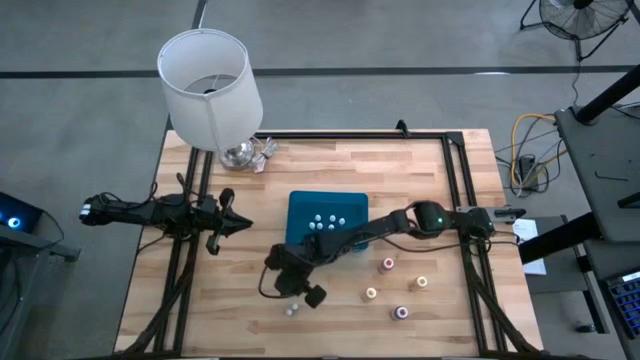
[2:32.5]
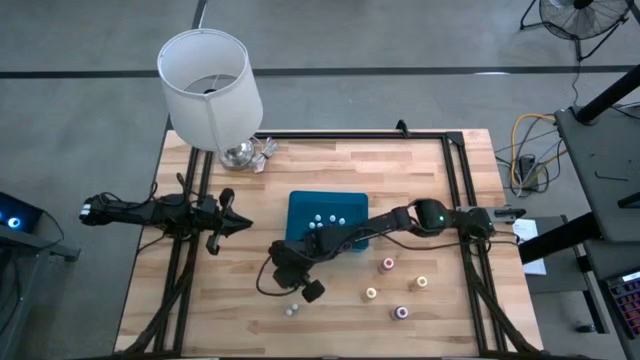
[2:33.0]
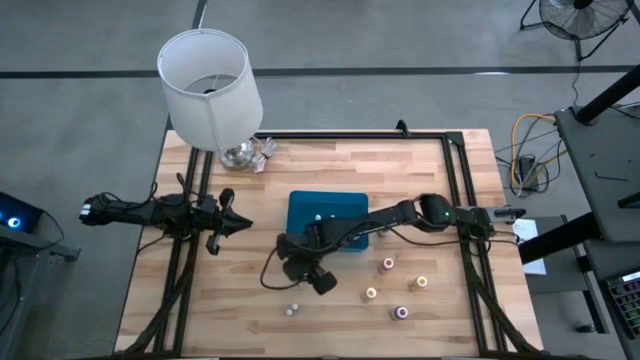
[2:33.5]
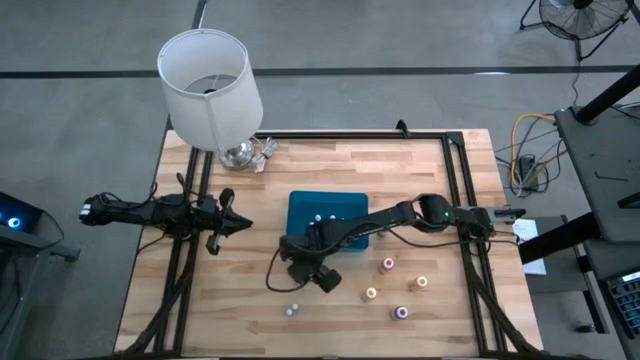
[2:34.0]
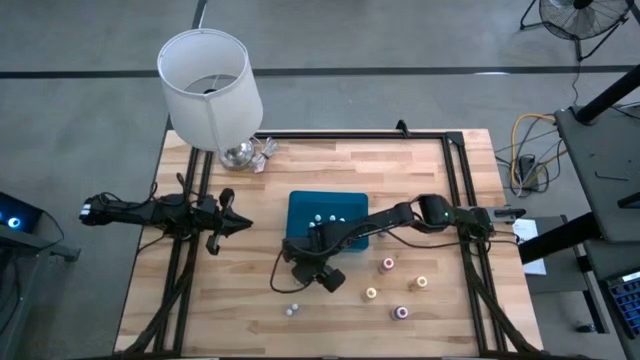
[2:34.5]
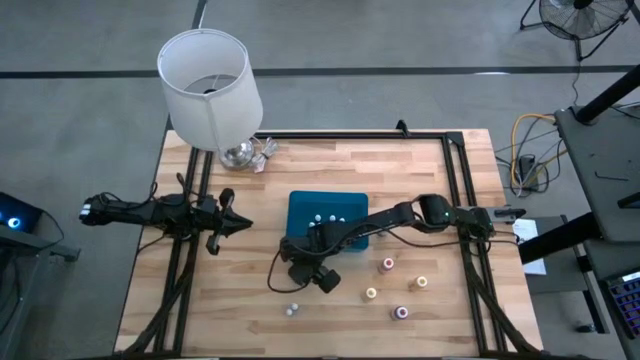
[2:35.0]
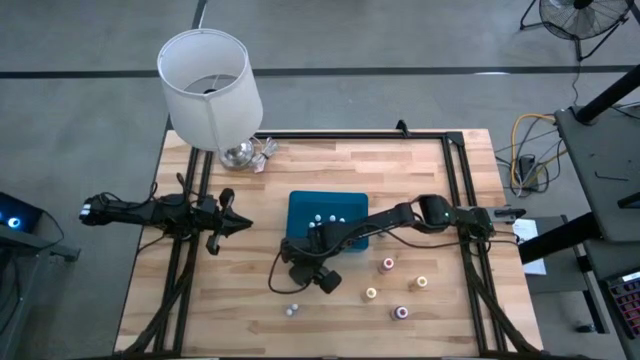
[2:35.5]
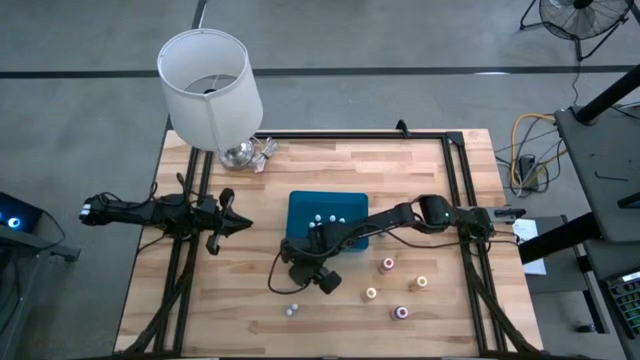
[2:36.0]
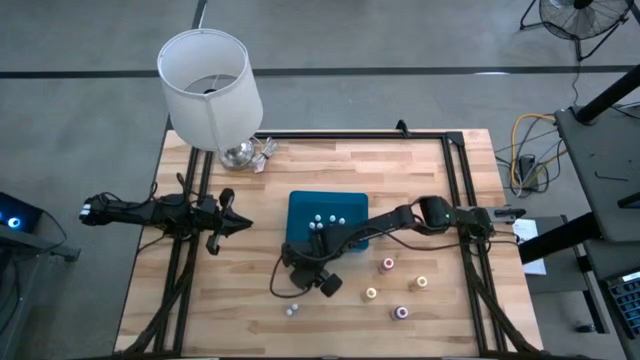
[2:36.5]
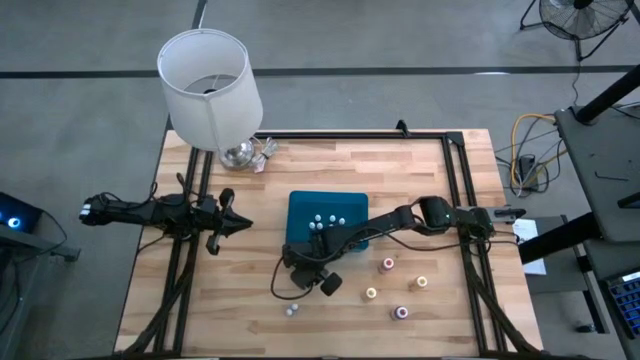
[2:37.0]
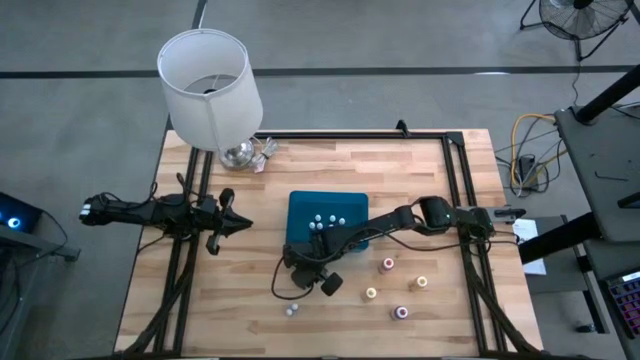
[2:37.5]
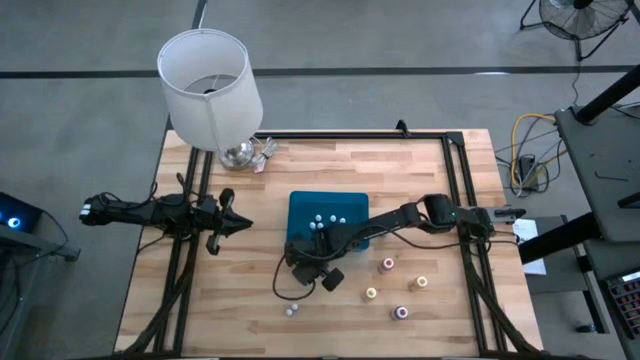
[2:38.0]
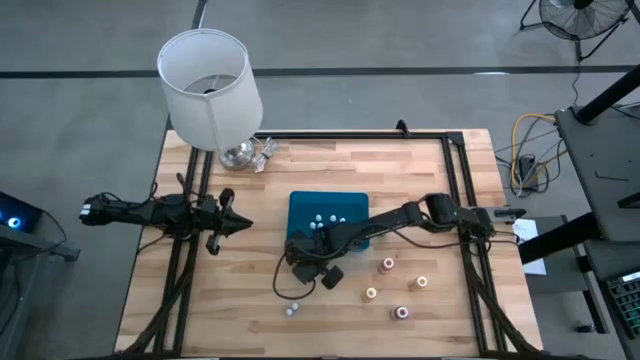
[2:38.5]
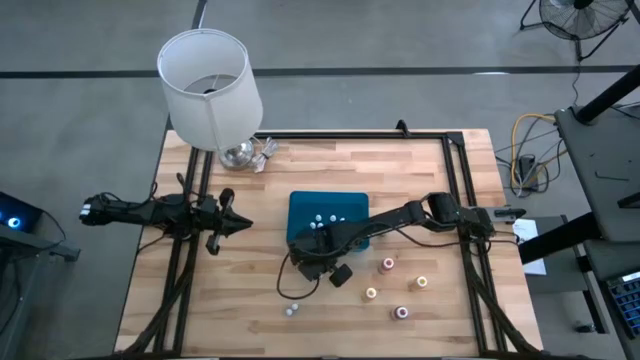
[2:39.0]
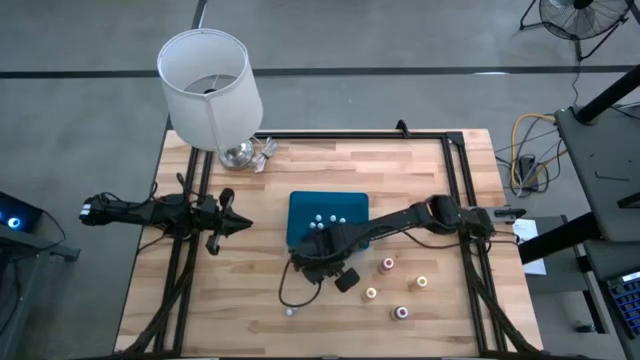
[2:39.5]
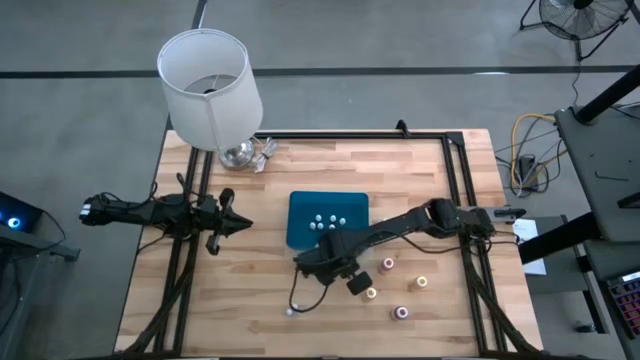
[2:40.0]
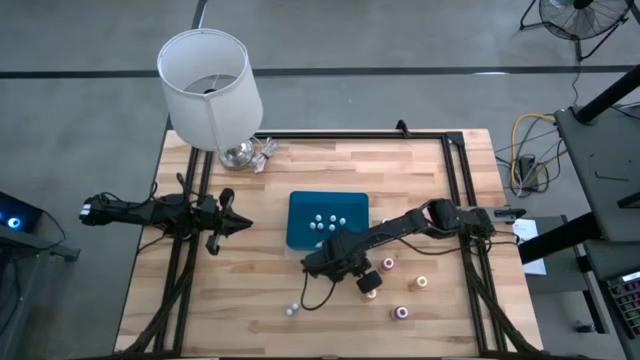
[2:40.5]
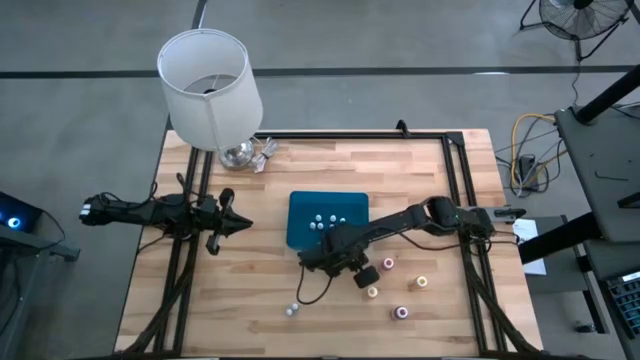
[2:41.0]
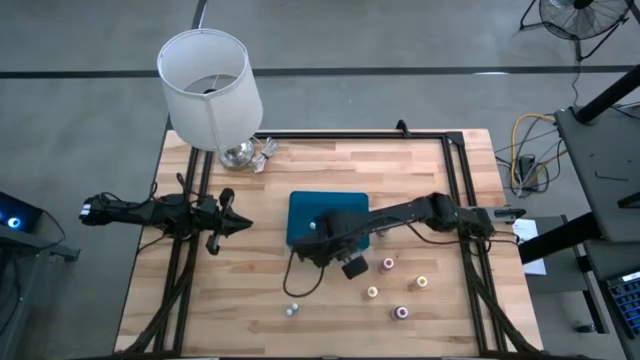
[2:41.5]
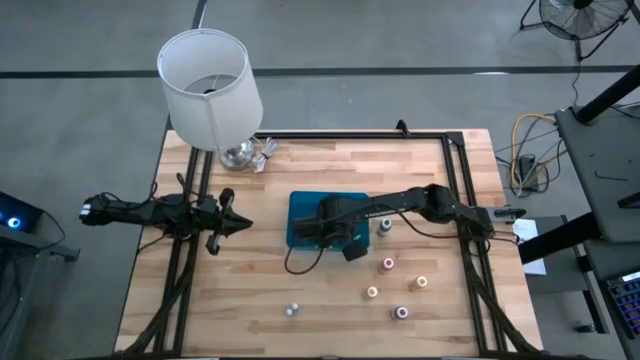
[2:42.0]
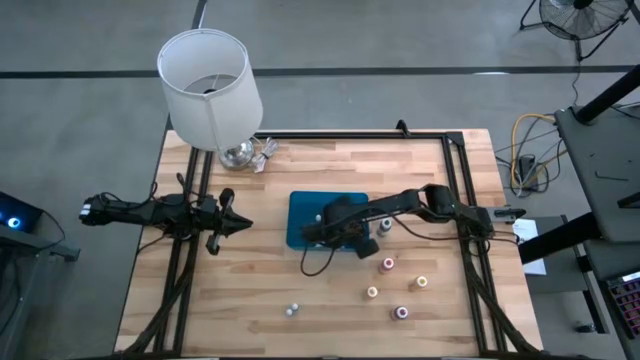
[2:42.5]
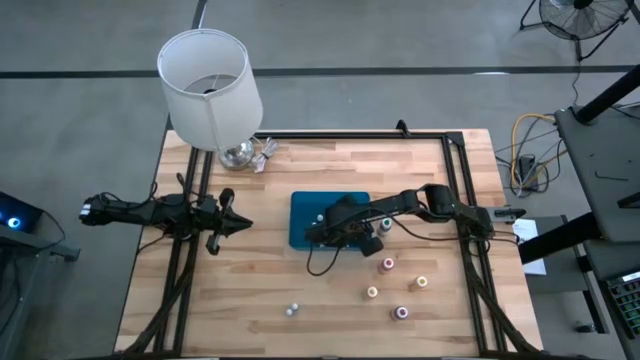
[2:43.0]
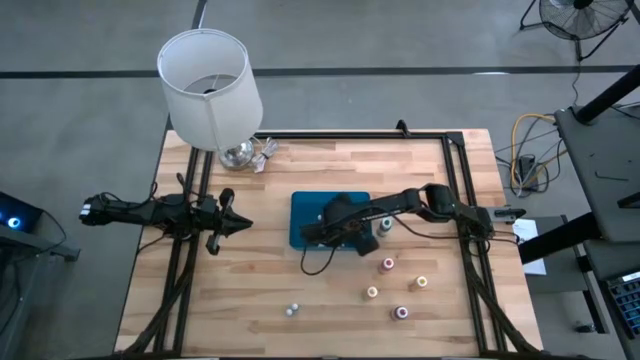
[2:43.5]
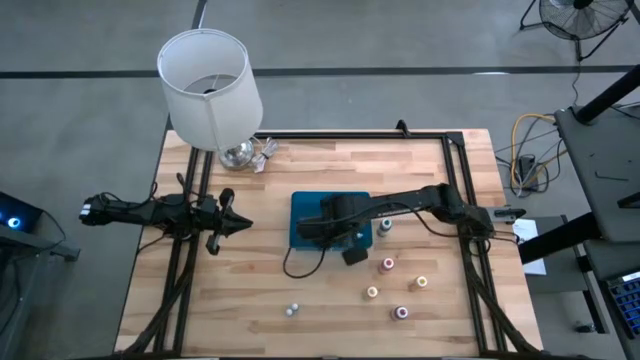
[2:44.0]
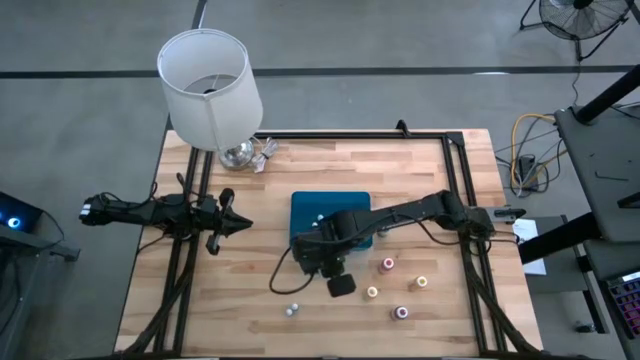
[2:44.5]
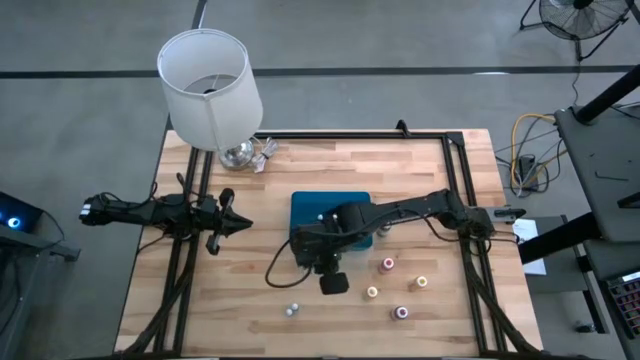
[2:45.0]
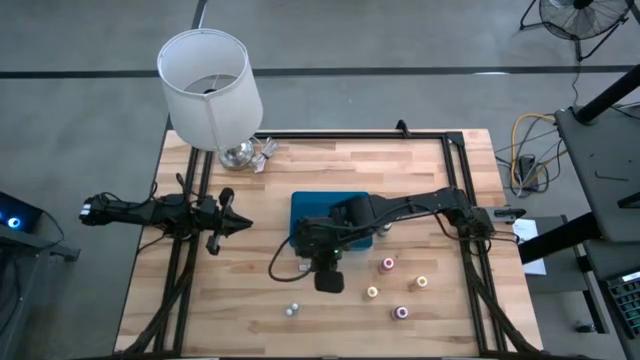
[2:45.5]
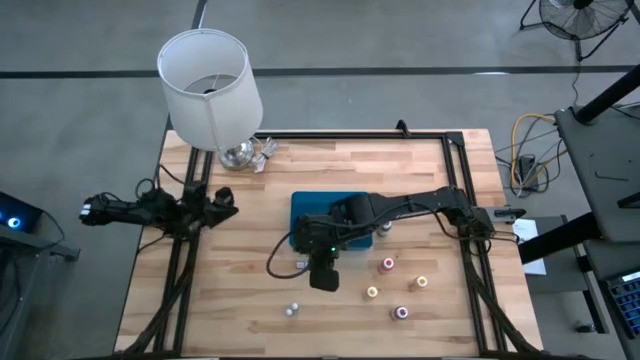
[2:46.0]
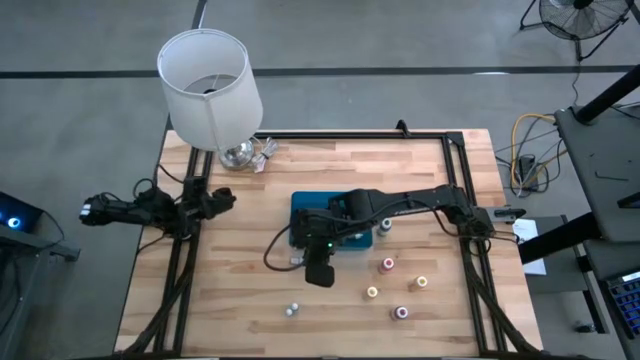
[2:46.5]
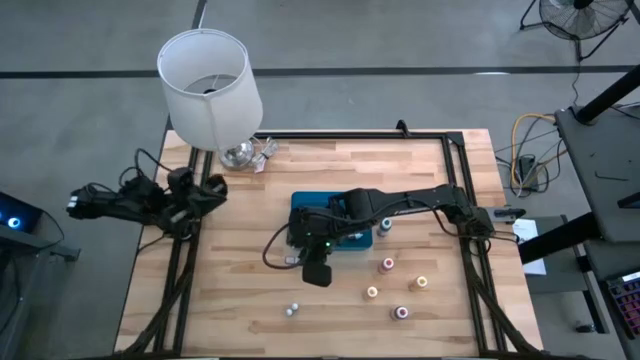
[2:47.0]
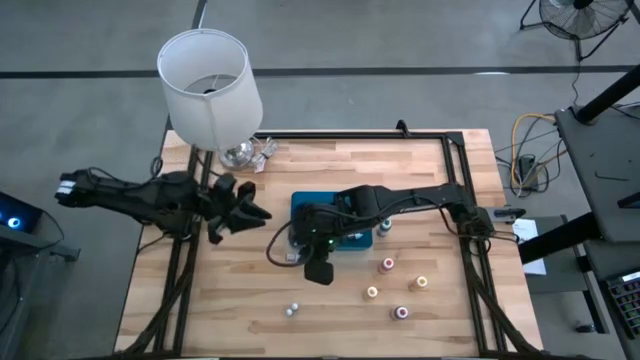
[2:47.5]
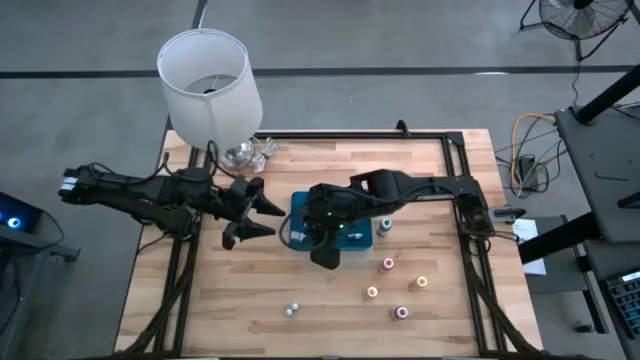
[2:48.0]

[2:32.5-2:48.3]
Task: Pick & Place food coloring
Put the small orange food coloring bottle into the blue bin

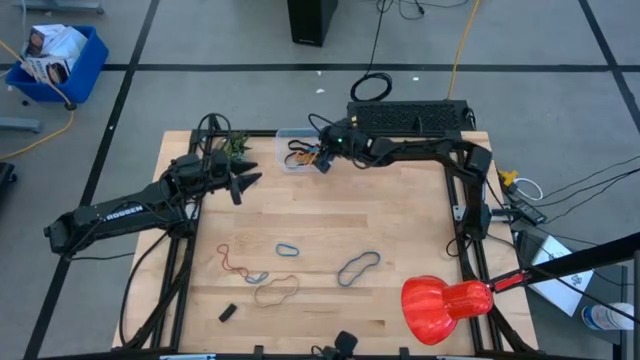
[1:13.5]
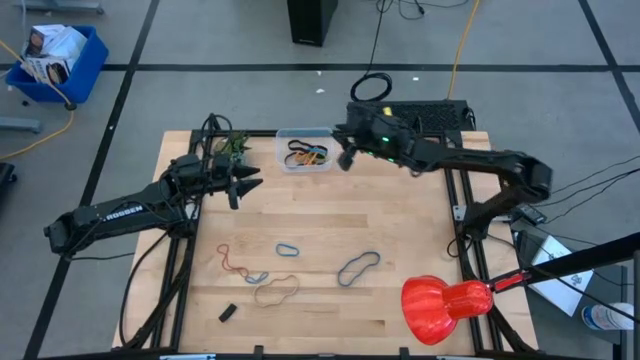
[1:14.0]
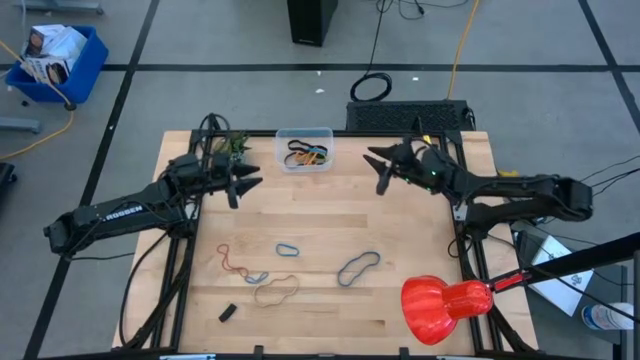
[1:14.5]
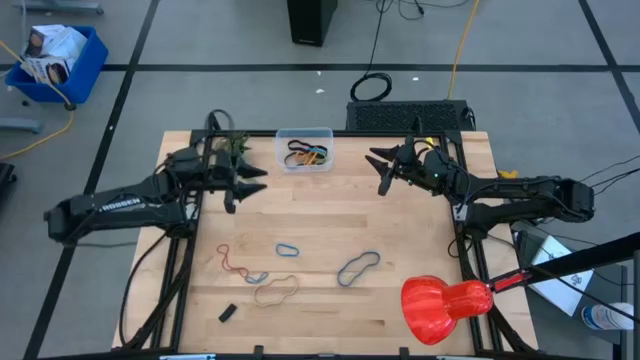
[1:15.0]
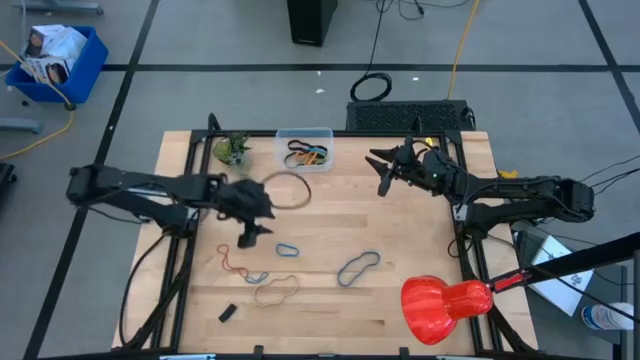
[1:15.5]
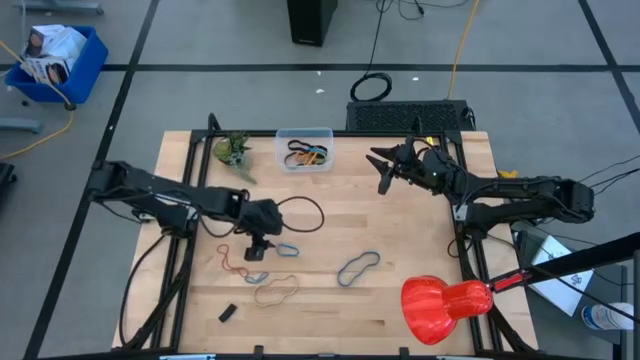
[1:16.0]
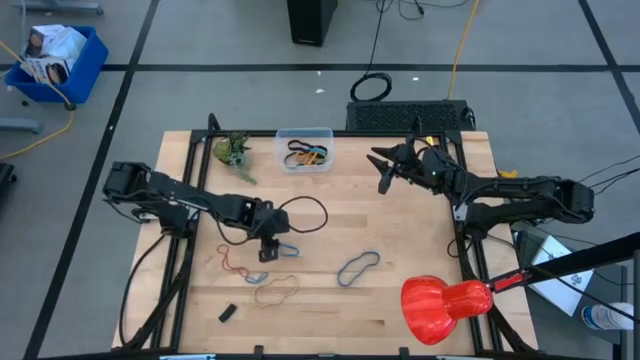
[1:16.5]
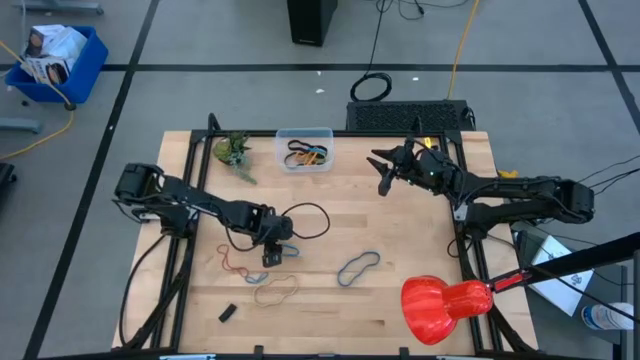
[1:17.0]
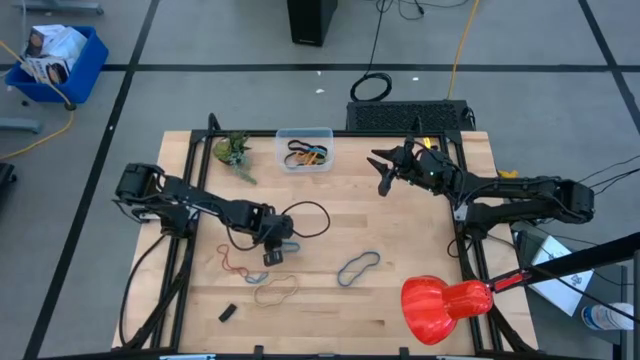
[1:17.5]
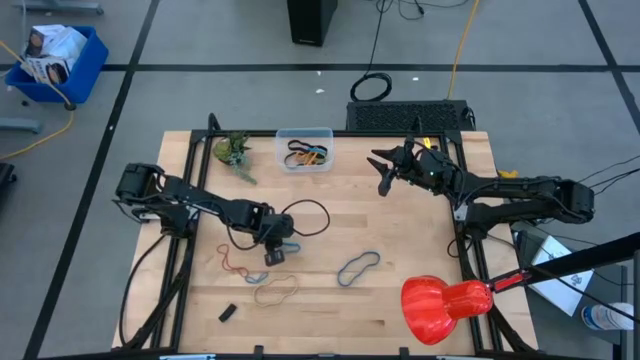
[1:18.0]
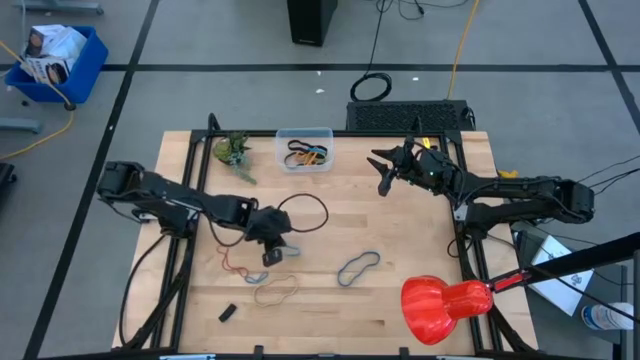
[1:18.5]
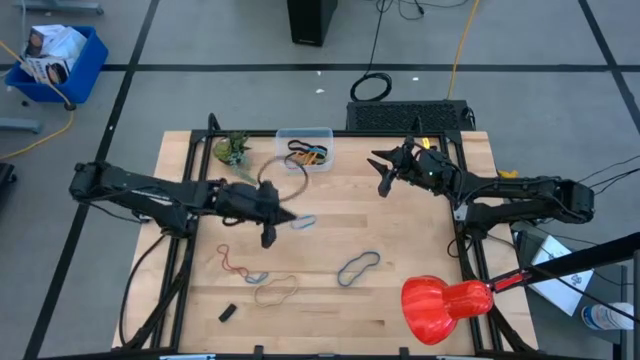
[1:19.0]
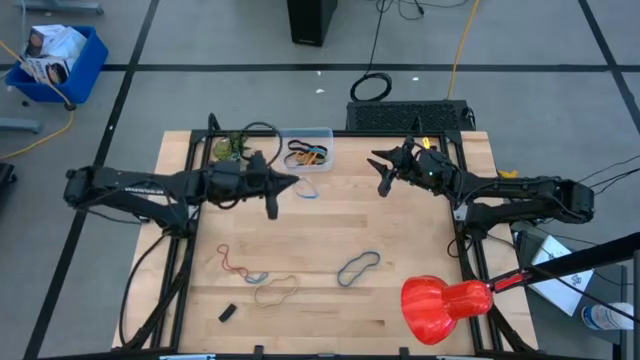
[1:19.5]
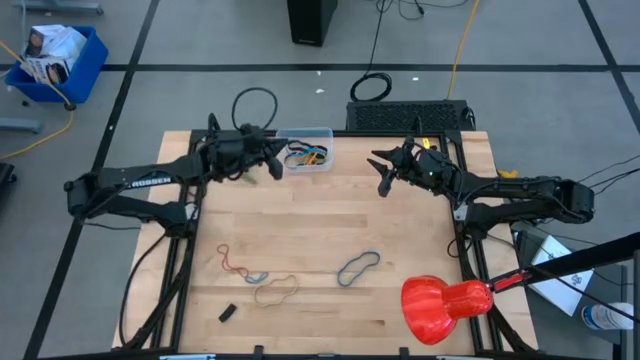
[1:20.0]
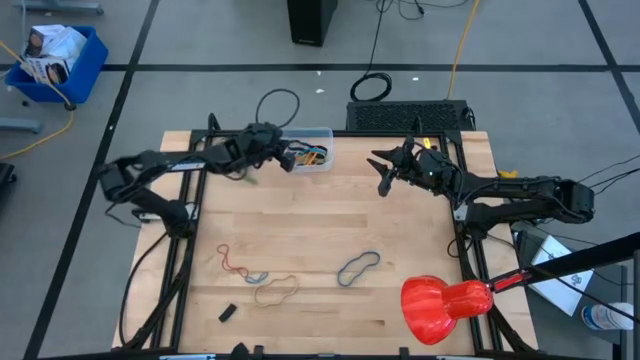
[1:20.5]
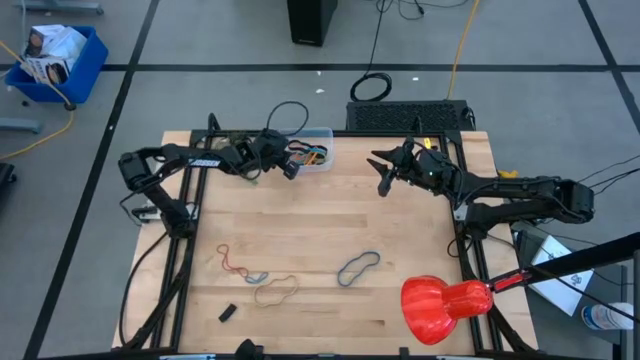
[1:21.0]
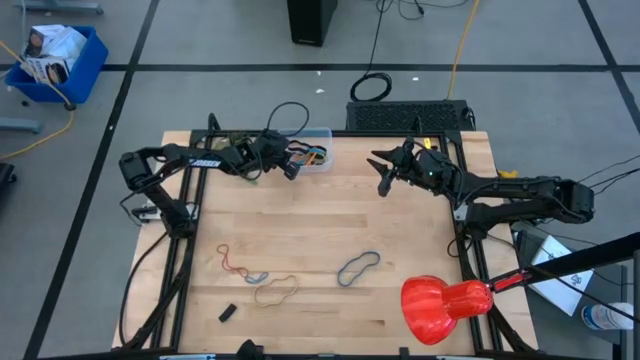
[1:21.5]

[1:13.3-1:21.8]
Task: Pick and place rubber bands into bin
Put the top blue rubber band into the transparent bin
